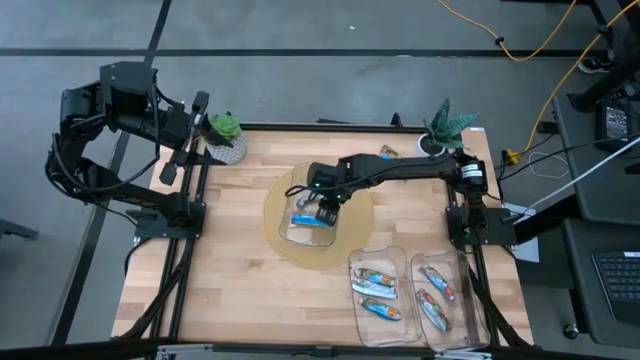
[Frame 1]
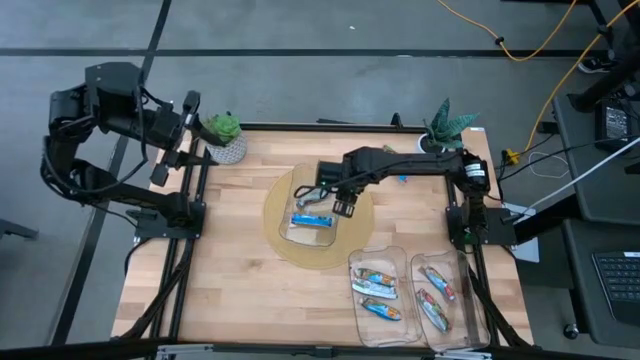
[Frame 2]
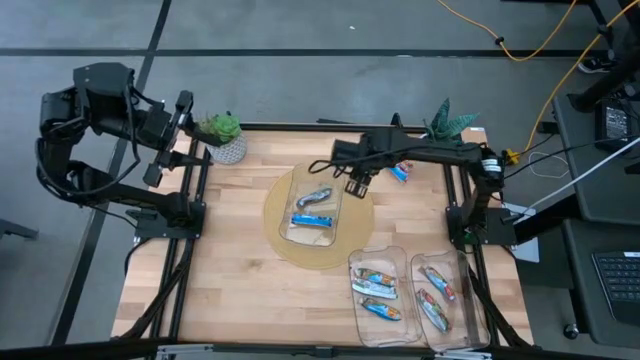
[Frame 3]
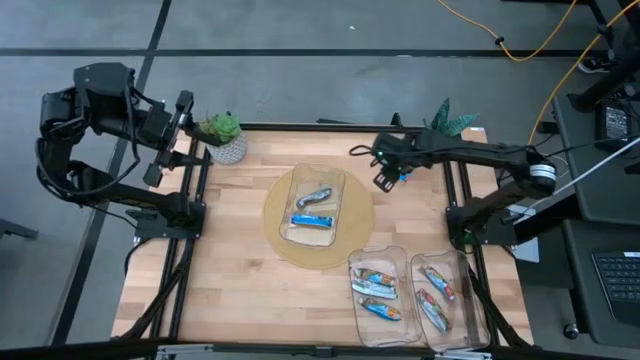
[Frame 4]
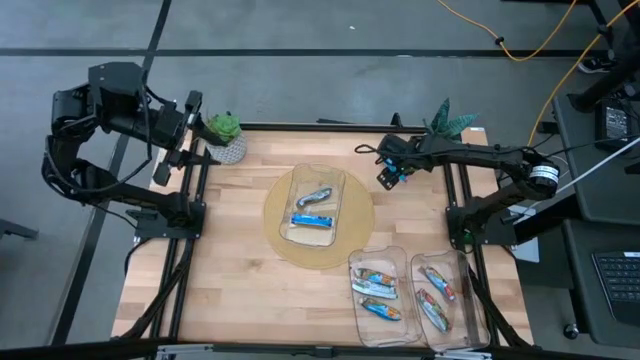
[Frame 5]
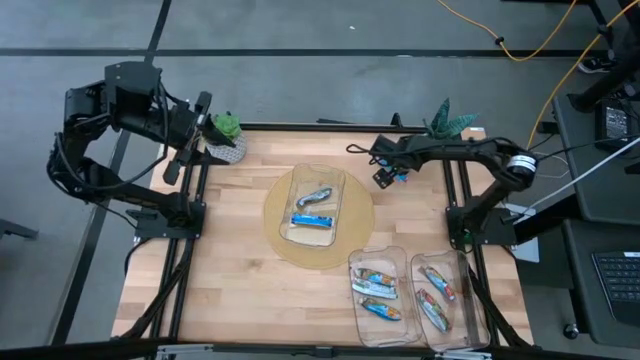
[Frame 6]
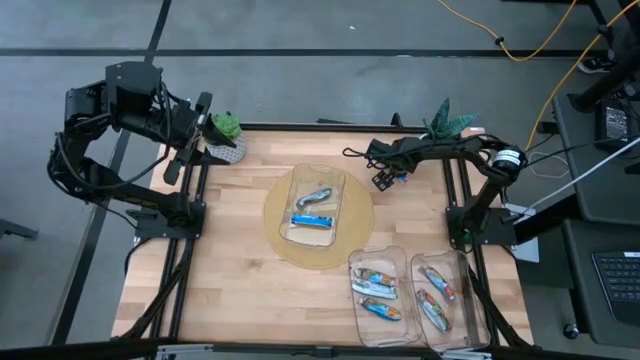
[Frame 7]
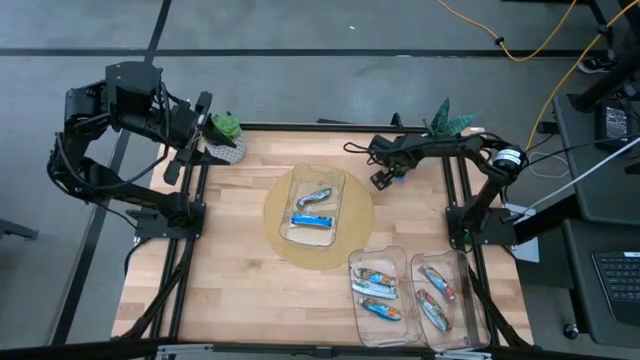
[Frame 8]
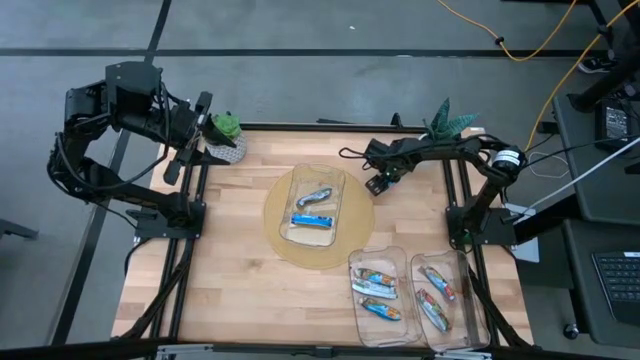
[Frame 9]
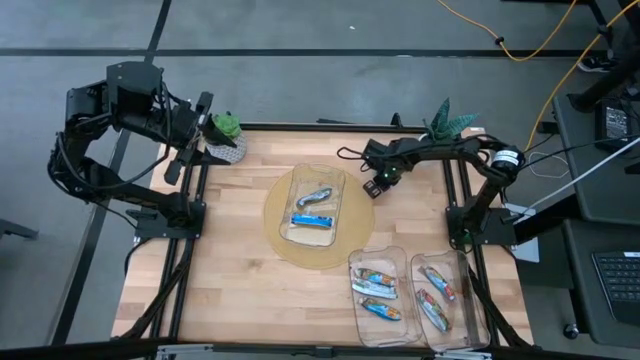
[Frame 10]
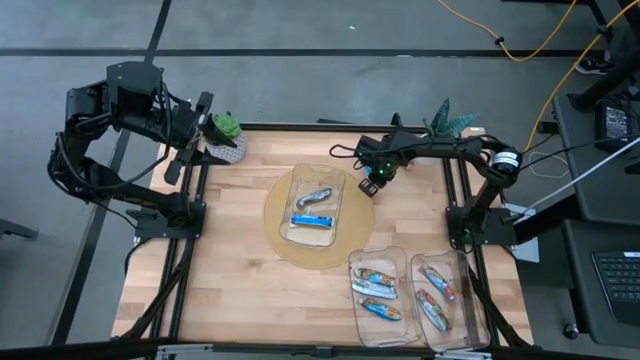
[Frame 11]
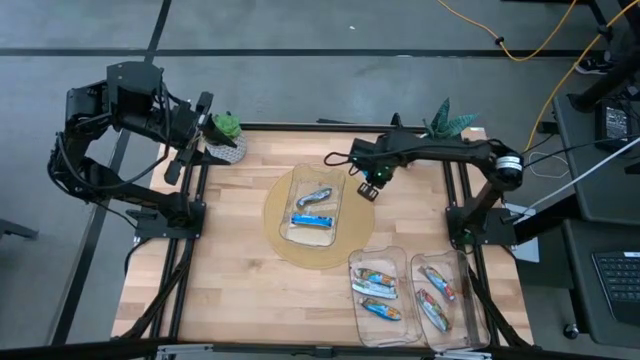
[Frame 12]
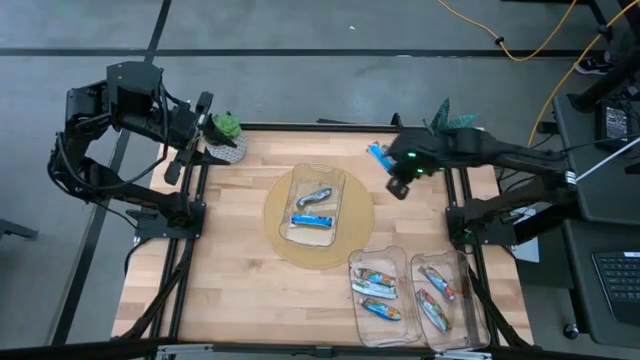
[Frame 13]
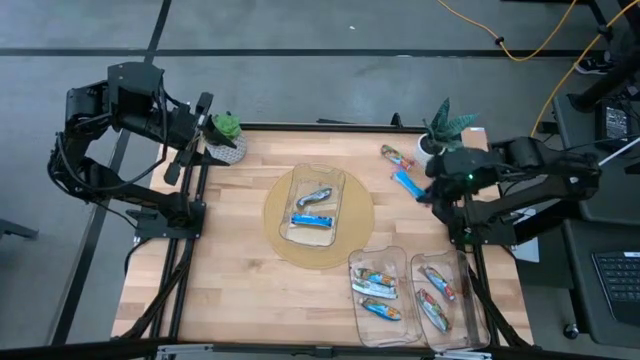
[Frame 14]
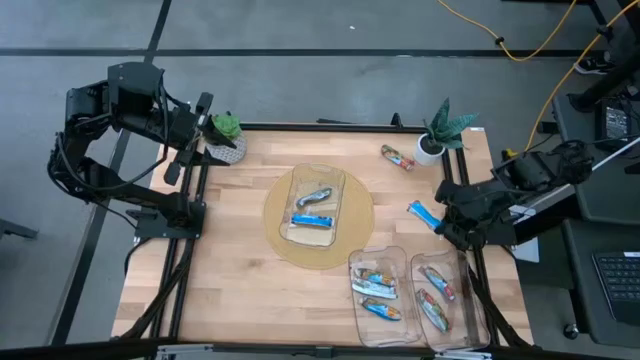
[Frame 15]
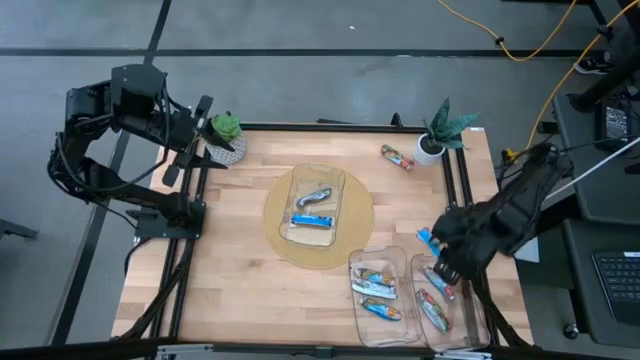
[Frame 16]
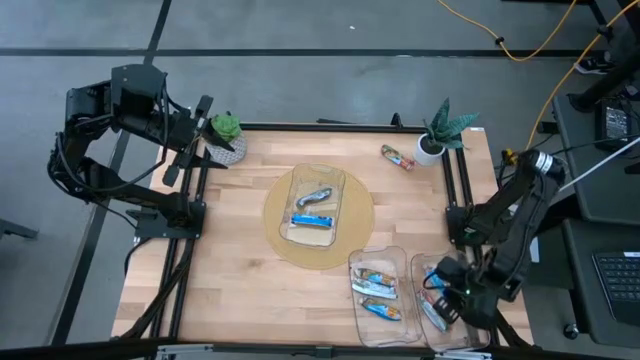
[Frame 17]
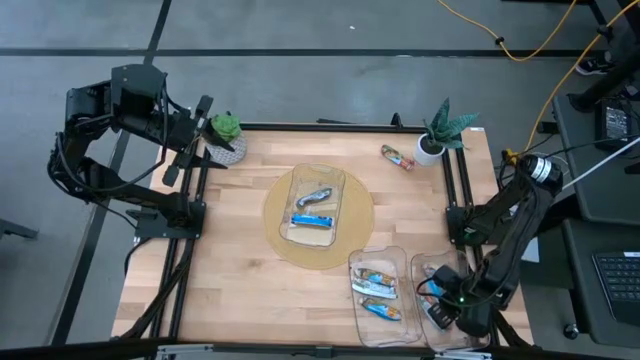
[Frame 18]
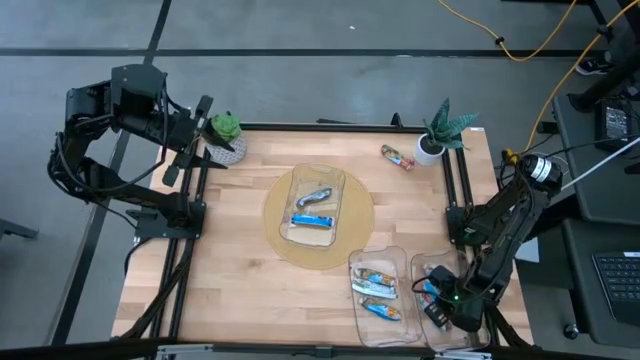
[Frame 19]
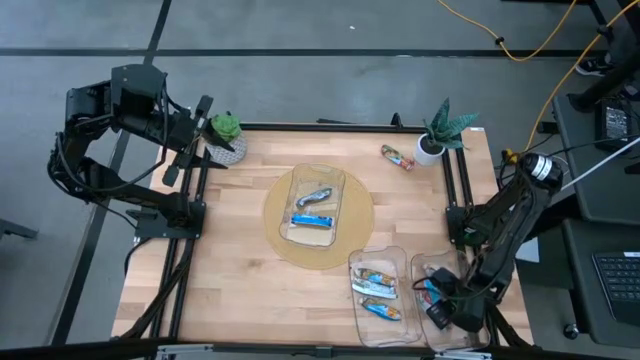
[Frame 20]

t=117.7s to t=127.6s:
Task: Pick and place Granola Bars by type
Put the red granola bar pack into the bottom right transparent bin

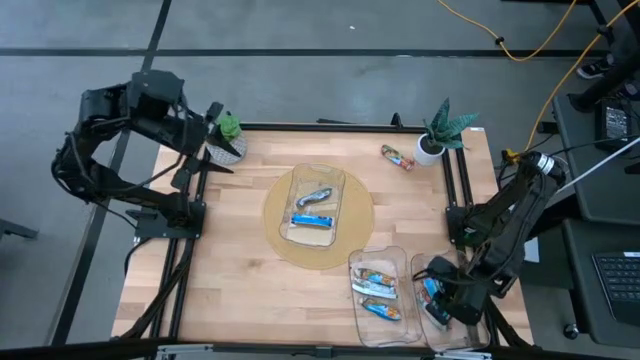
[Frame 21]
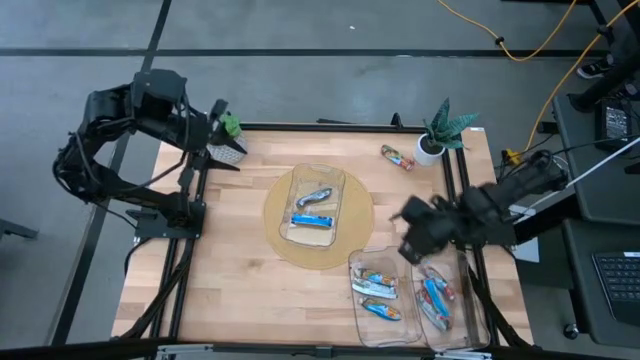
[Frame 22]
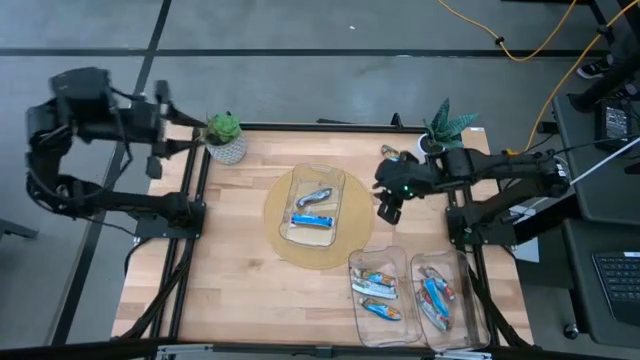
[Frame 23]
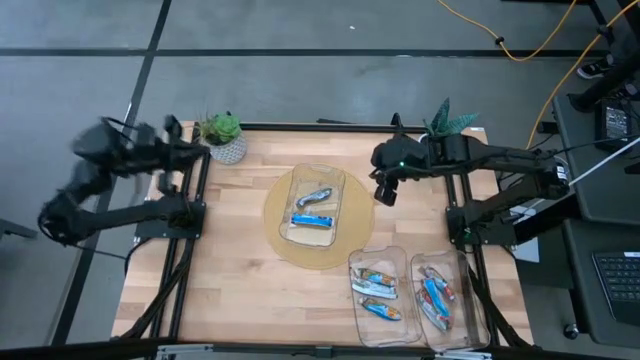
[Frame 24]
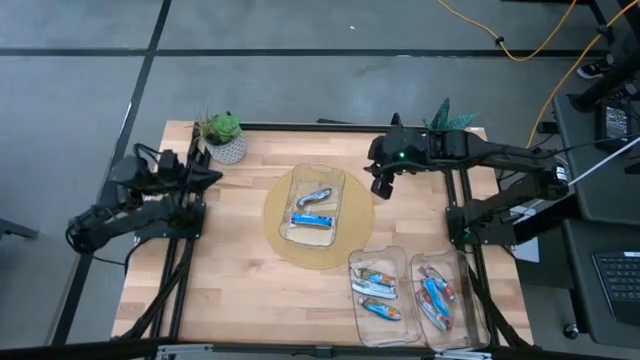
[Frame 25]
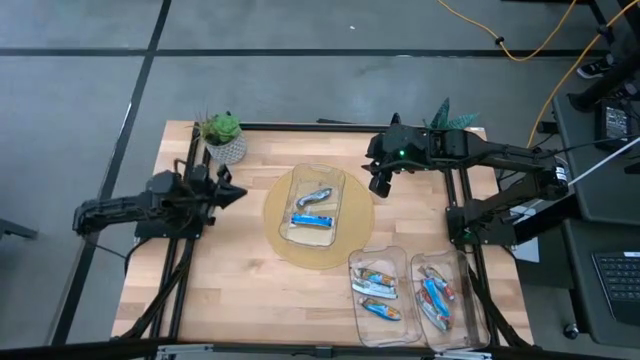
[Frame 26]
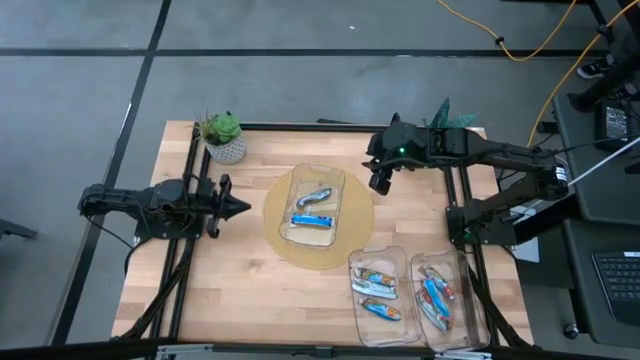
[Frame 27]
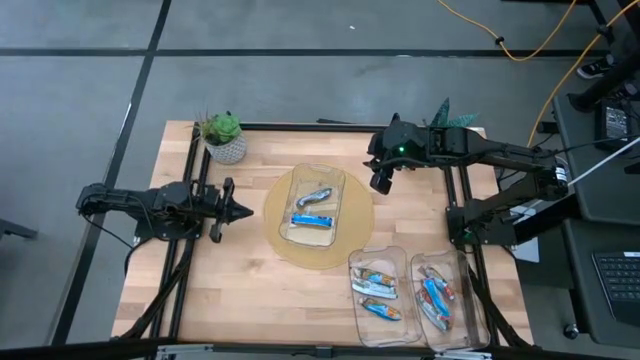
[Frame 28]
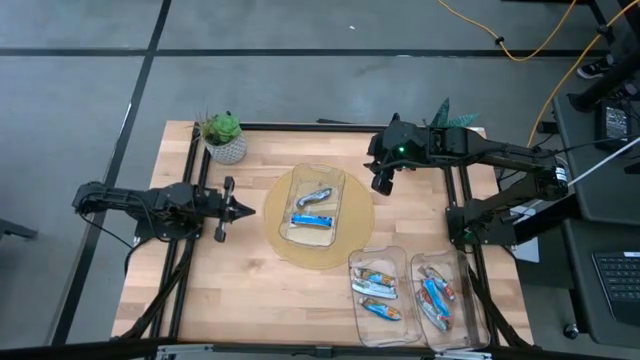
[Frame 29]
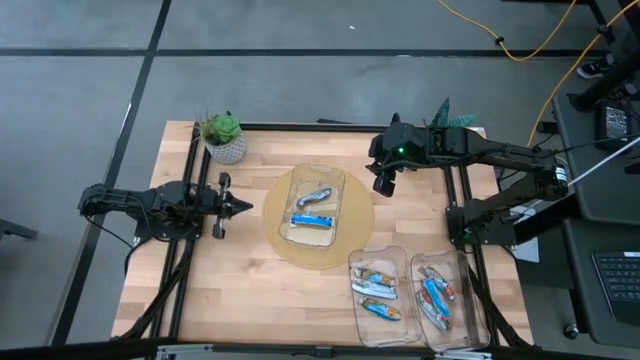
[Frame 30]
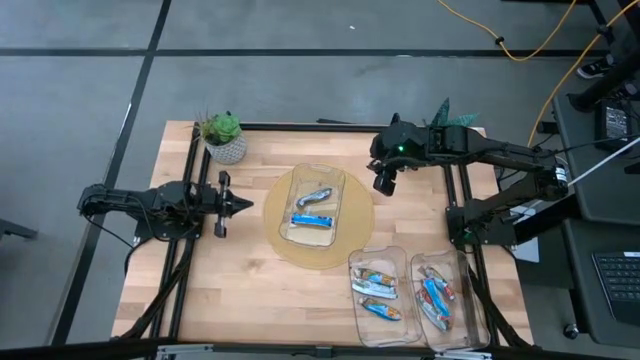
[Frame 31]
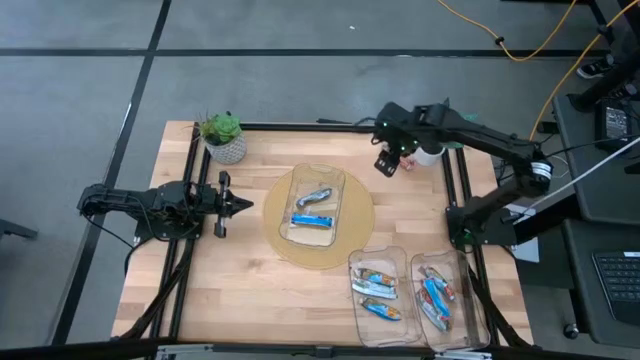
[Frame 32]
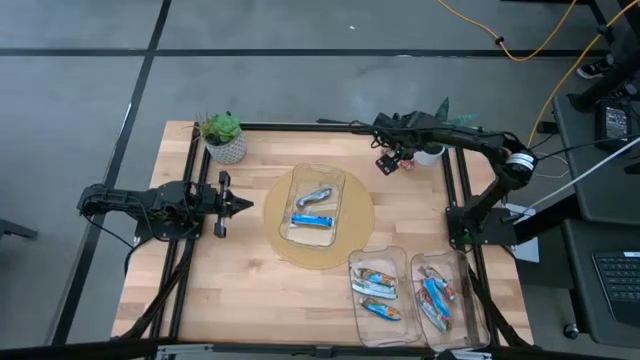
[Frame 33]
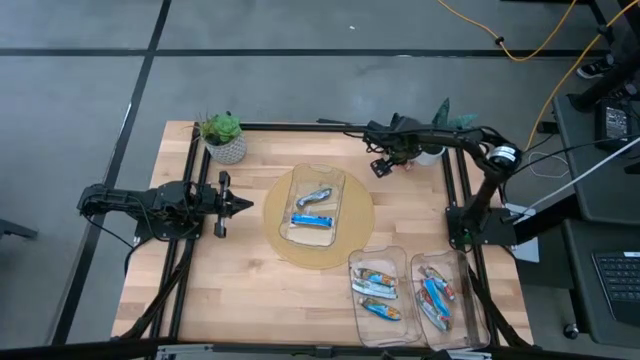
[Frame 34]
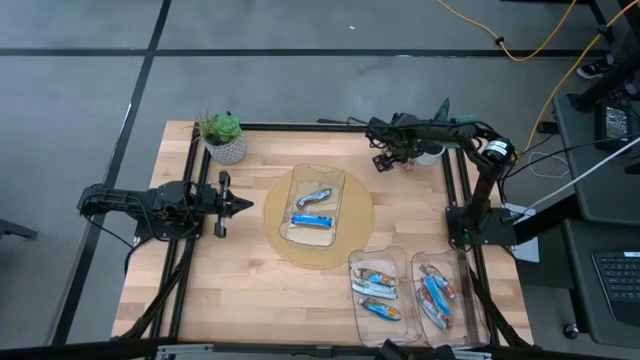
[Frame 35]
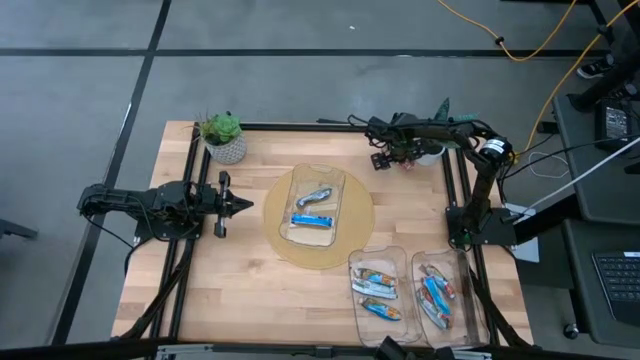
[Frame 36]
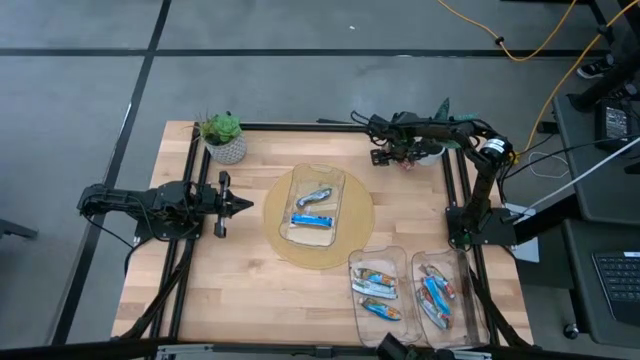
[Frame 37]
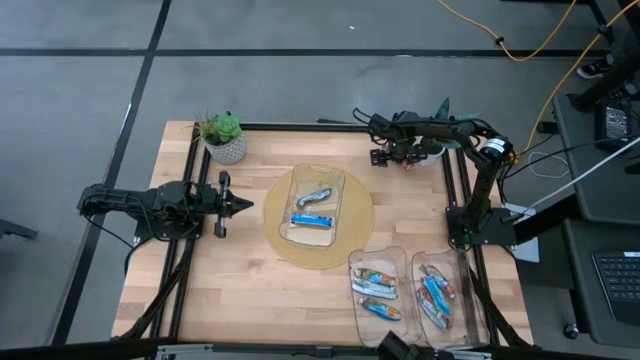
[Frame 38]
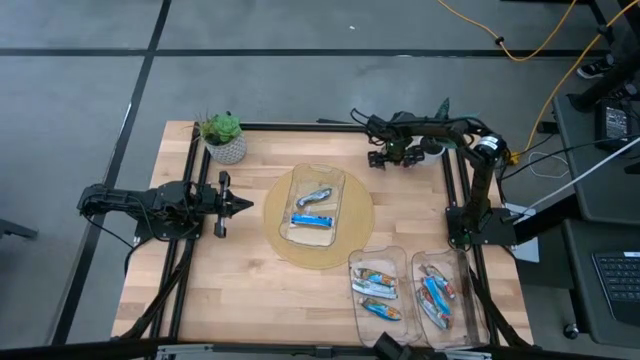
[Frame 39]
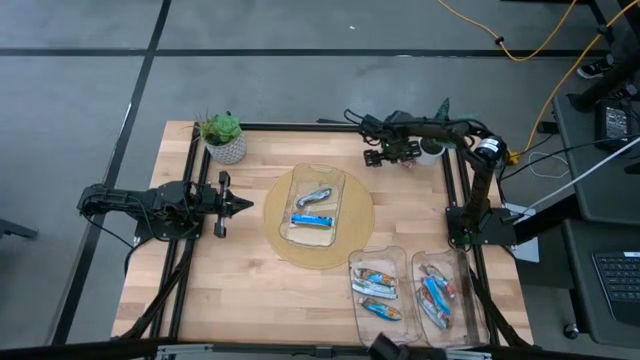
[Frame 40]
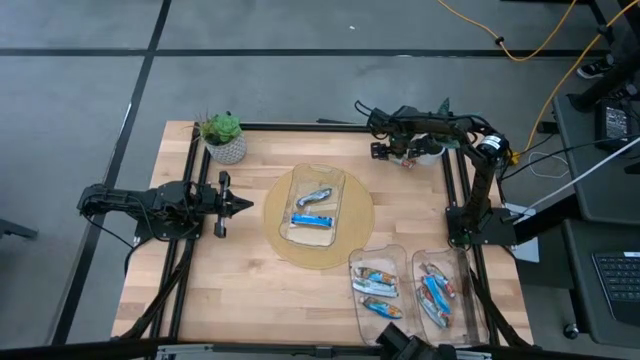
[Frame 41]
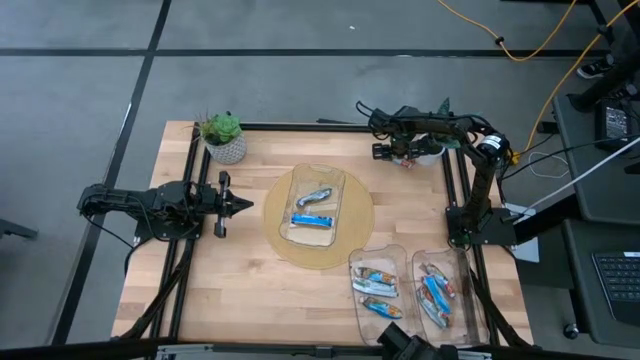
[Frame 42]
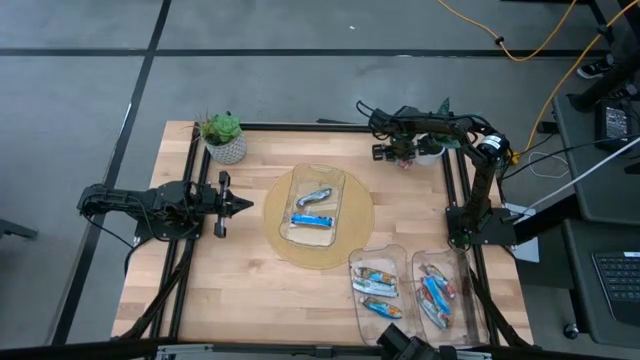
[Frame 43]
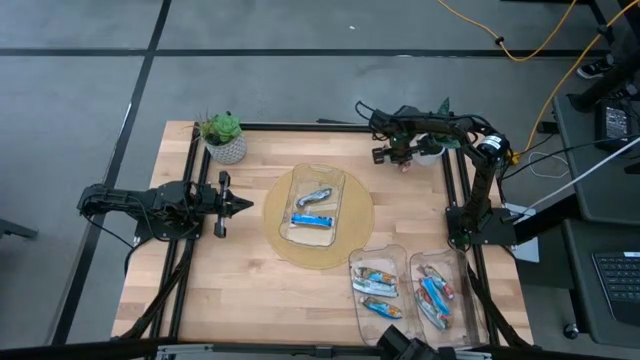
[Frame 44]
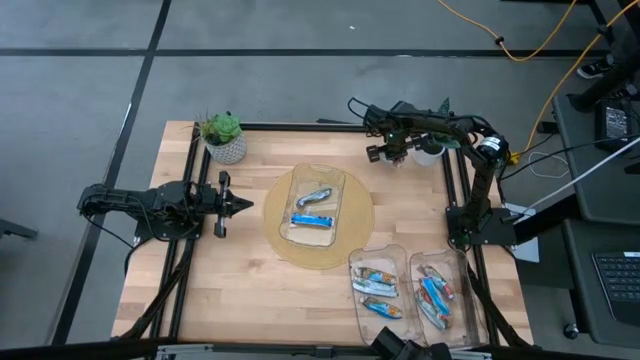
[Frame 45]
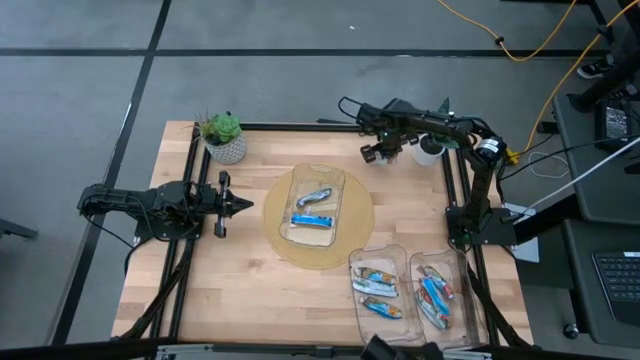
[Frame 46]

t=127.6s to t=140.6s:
Put the red granola bar pack into the bottom right transparent bin
